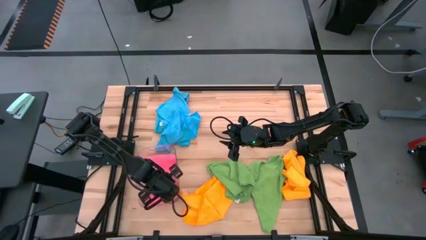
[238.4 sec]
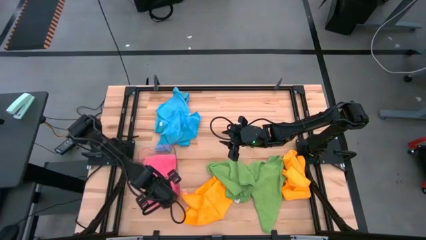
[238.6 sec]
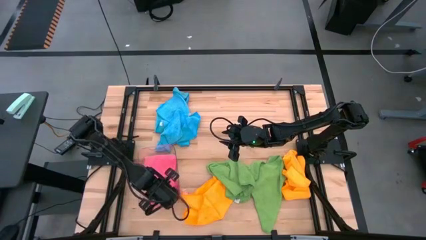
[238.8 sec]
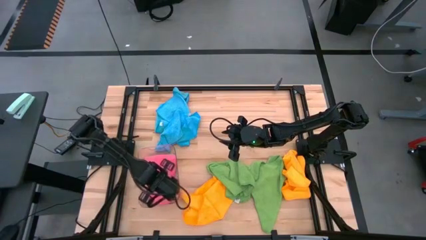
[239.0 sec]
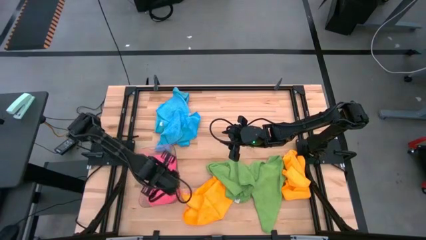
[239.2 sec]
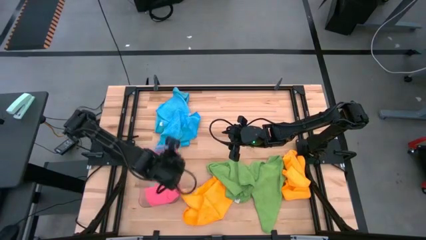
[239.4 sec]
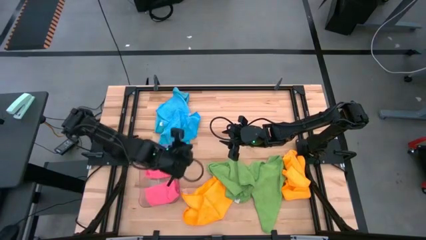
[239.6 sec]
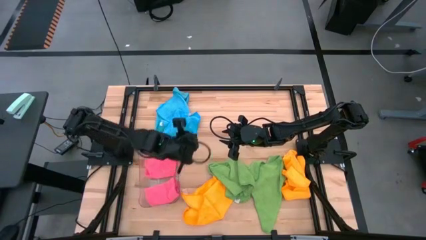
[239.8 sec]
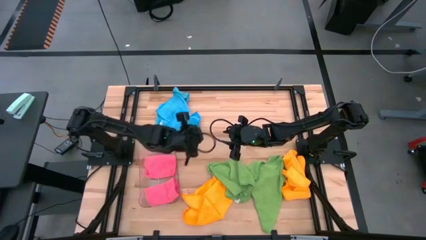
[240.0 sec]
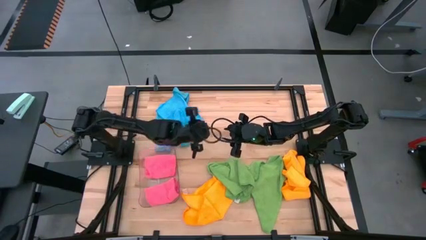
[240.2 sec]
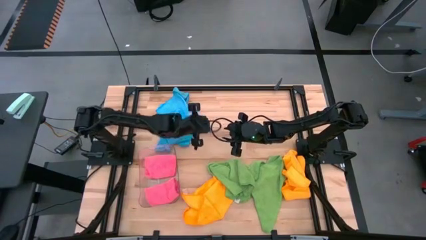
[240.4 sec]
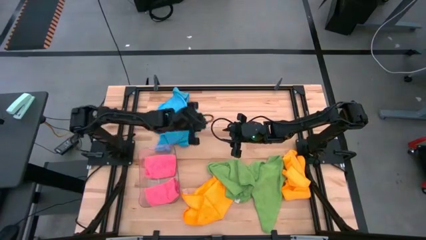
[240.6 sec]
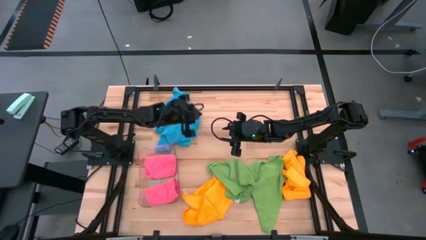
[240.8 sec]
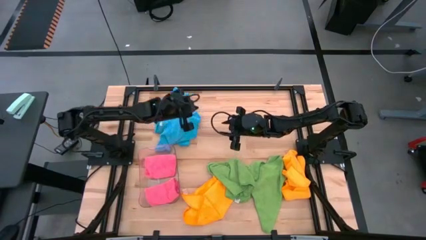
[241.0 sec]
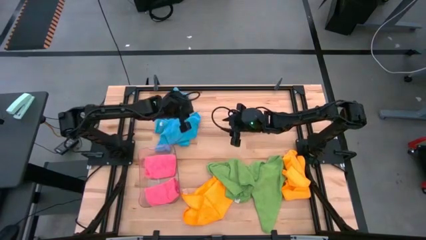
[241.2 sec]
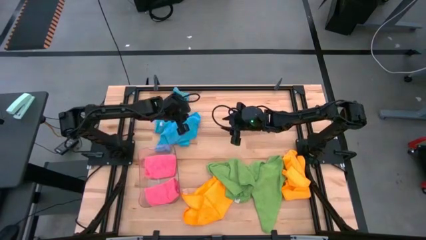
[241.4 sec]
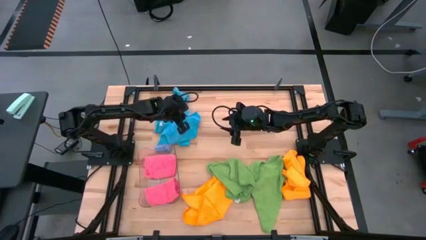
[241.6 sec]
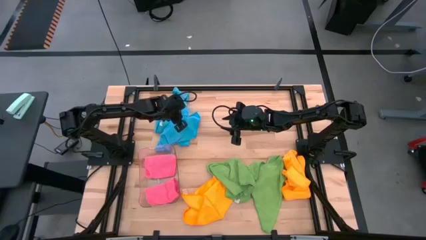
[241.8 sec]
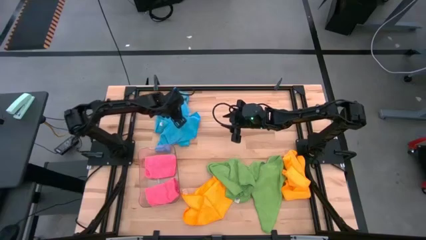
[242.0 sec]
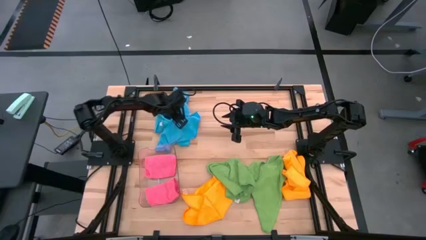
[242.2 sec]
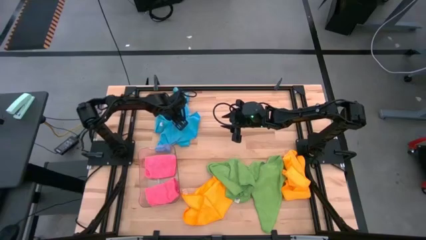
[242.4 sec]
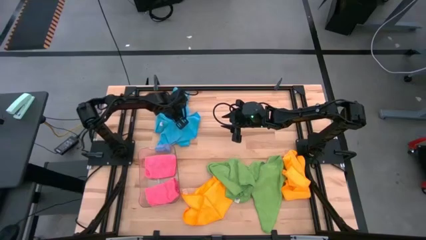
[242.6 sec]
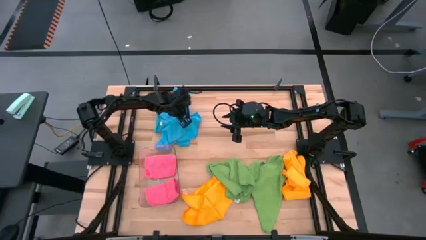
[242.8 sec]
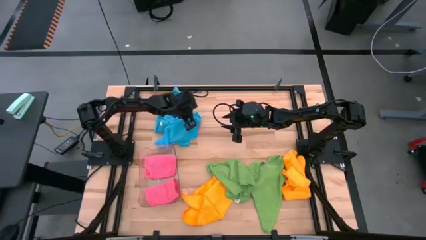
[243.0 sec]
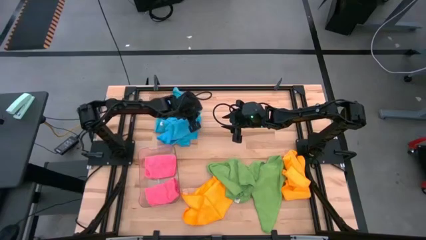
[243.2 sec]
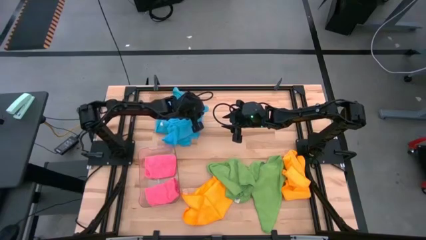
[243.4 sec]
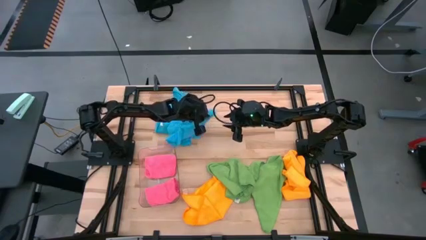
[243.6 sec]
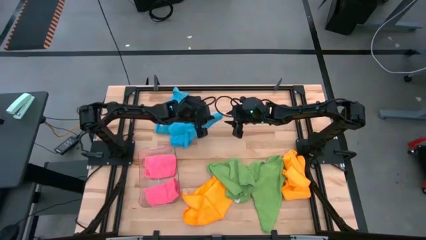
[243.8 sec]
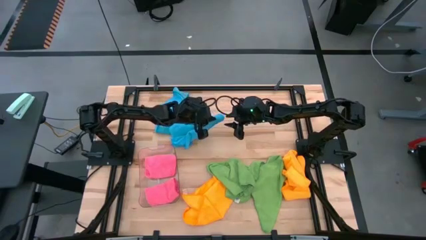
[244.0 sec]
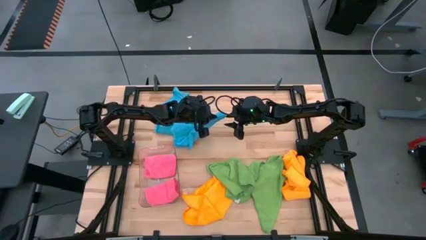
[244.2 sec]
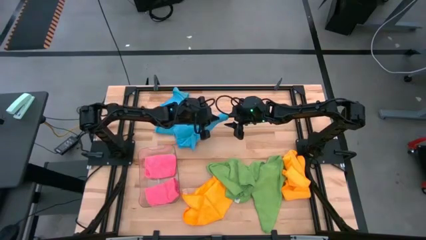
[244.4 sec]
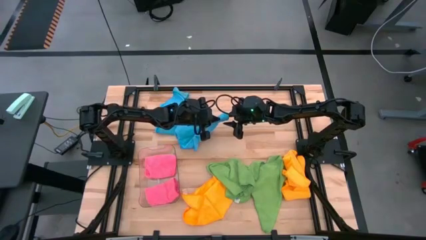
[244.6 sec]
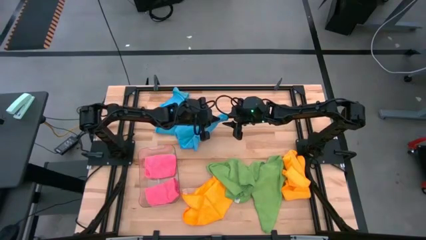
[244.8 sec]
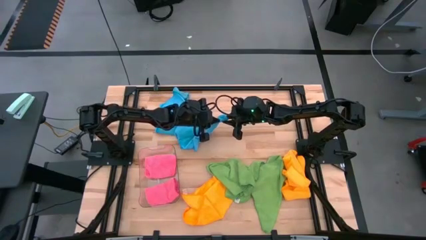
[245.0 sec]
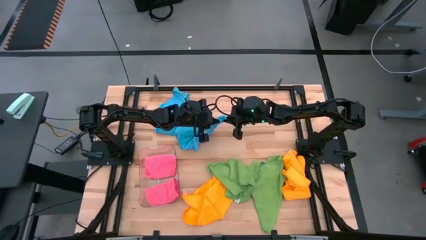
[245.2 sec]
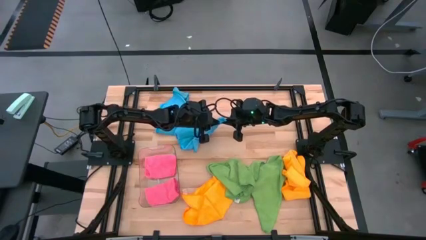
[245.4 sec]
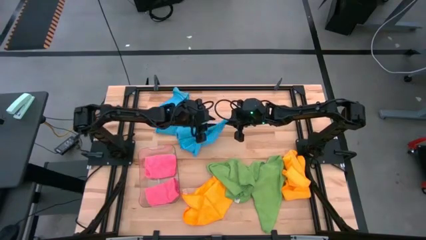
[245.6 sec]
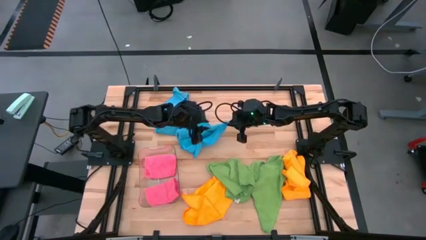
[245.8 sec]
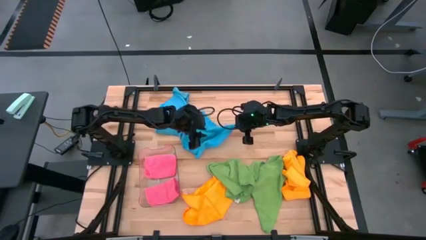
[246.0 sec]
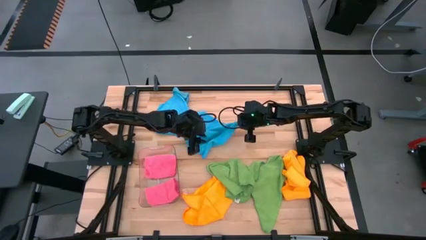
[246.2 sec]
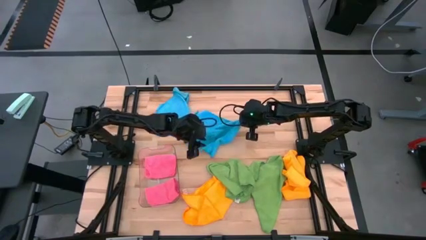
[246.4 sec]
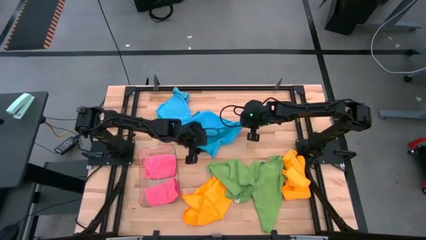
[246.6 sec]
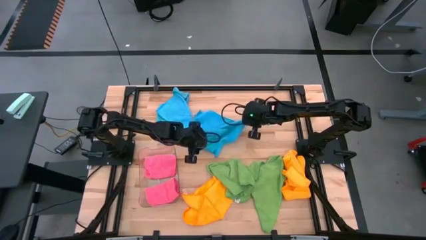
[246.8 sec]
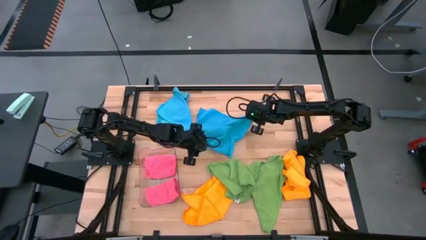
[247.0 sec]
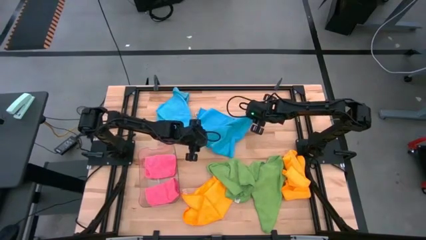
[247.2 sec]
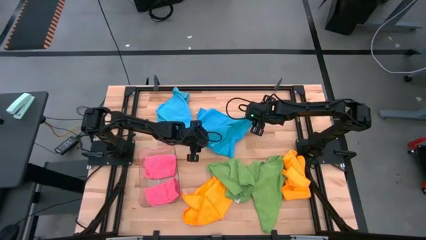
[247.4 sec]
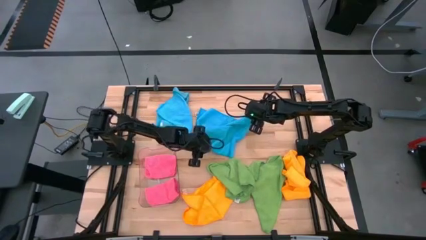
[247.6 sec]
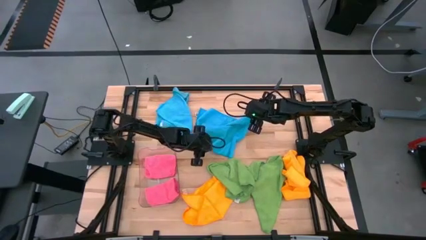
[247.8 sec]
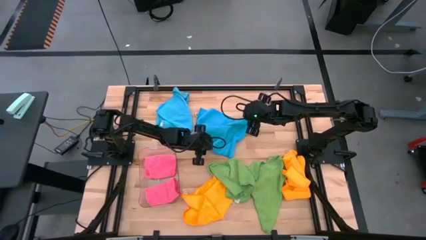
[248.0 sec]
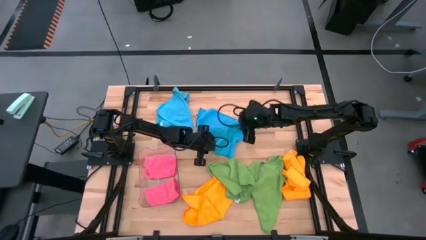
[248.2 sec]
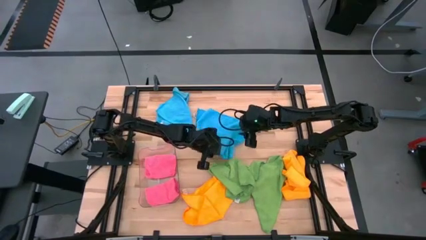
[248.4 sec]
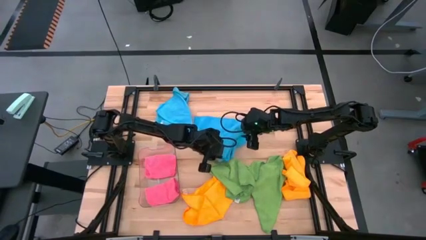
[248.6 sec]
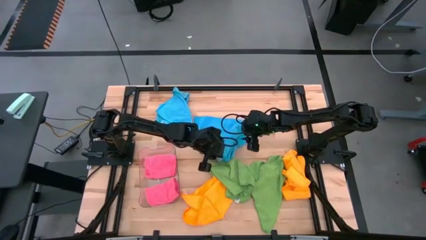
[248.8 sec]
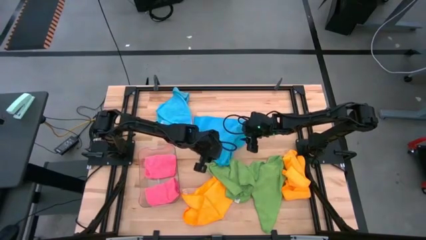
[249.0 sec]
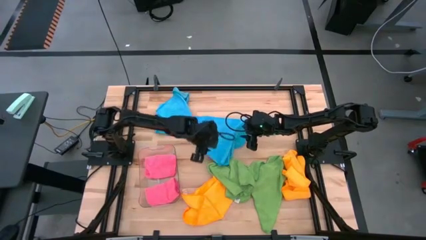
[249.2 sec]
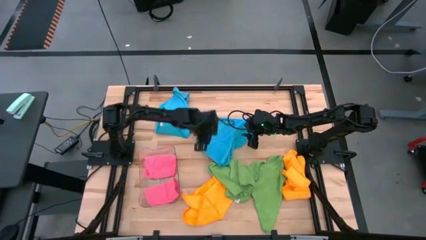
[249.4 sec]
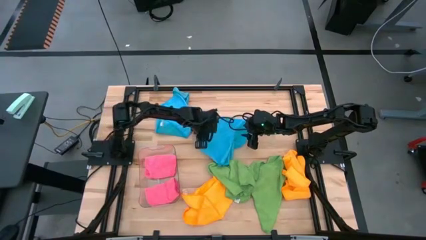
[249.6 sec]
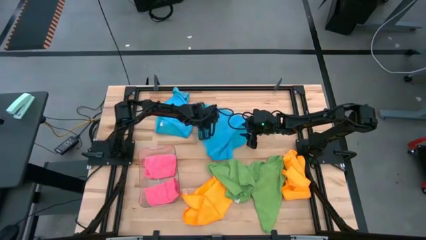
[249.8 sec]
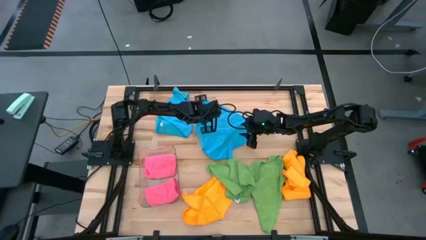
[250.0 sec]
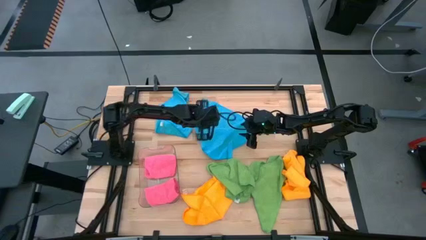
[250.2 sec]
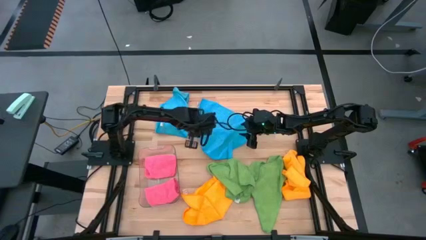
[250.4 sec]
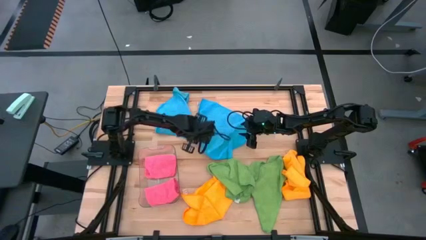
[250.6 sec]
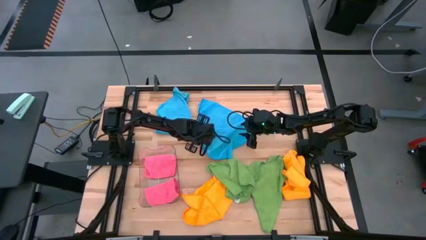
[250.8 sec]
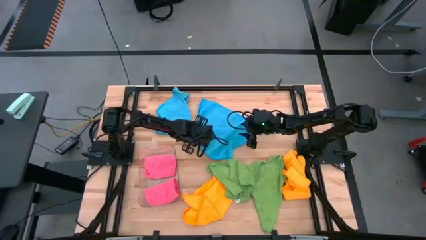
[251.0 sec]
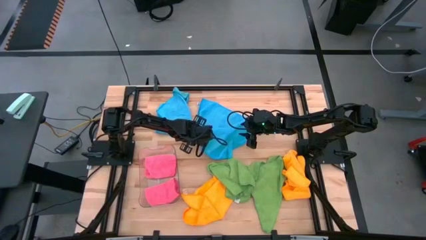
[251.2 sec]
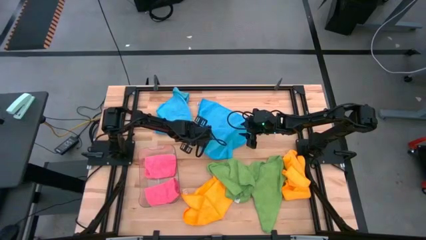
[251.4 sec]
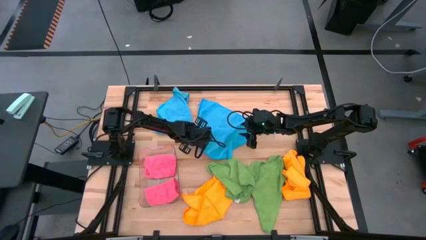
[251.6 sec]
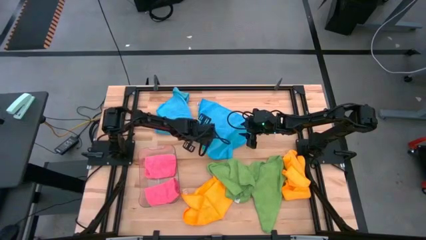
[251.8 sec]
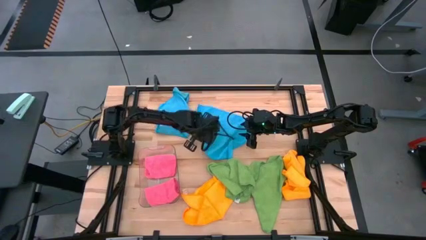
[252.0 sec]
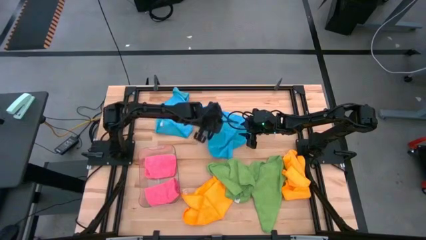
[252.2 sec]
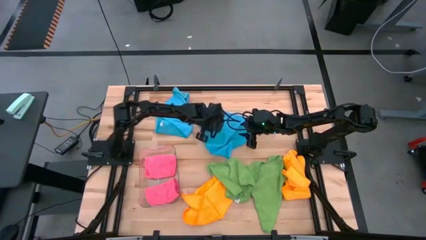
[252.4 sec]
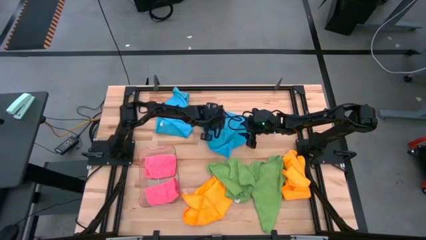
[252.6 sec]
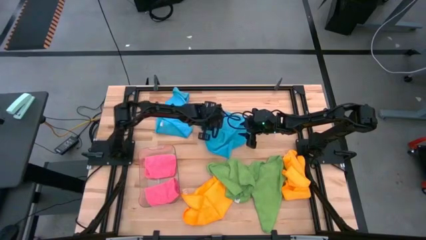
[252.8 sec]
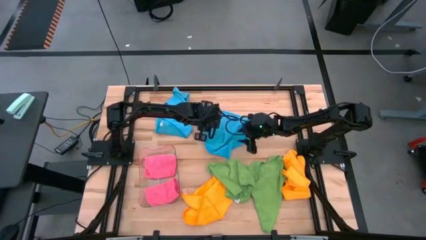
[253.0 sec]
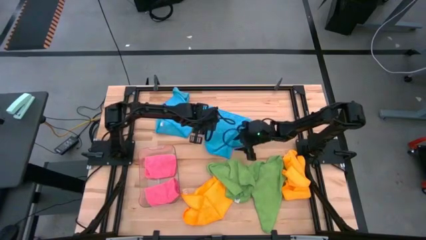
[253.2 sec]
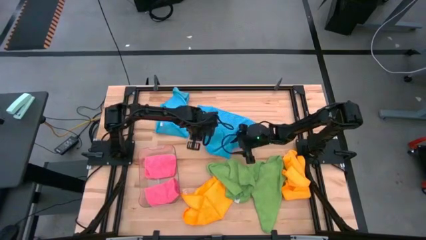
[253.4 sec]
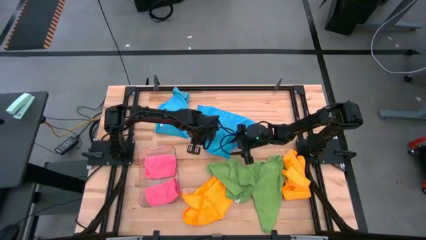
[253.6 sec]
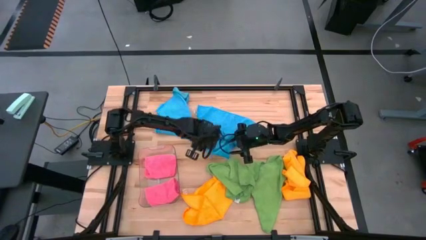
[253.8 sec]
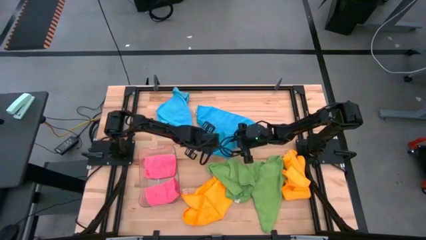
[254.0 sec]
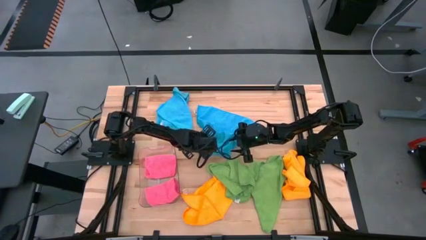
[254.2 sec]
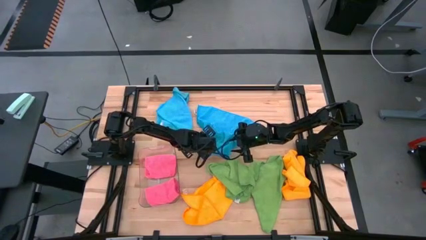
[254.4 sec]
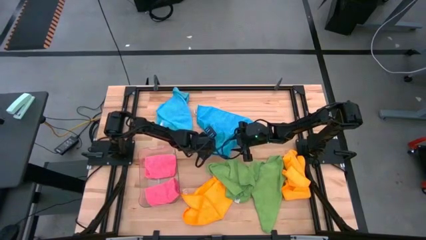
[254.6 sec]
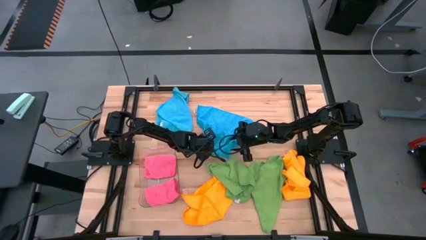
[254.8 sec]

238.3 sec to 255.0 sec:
Task: Fold microfiber towels
Fold the bottom blue microfiber cloth
